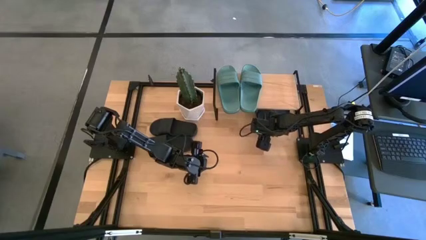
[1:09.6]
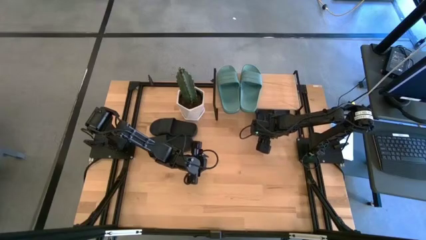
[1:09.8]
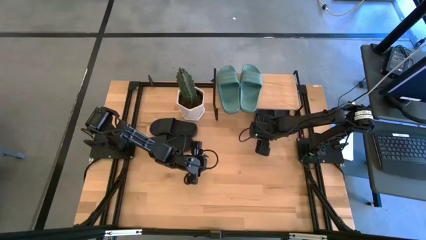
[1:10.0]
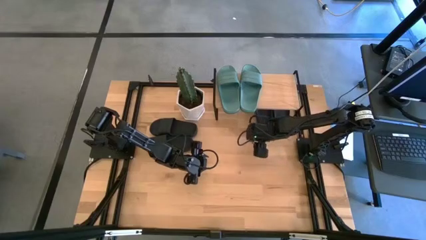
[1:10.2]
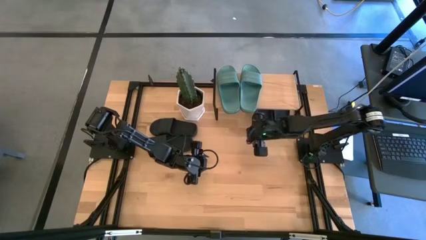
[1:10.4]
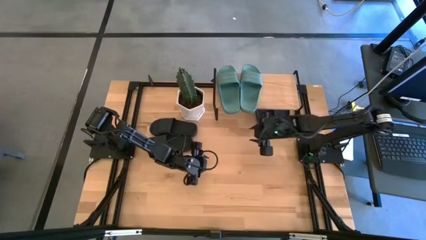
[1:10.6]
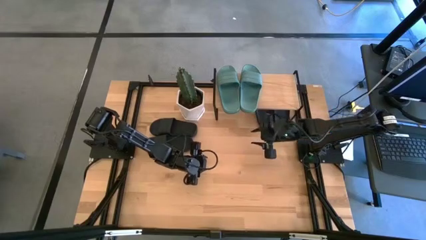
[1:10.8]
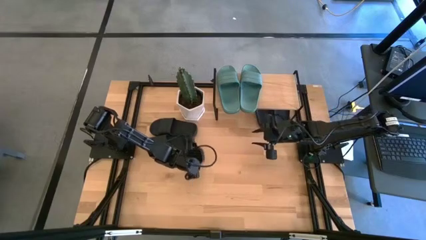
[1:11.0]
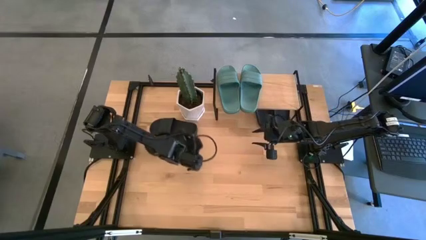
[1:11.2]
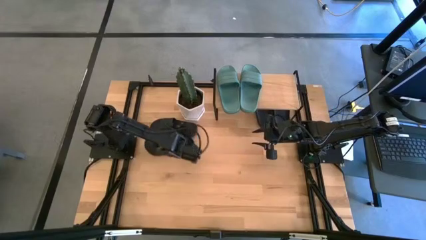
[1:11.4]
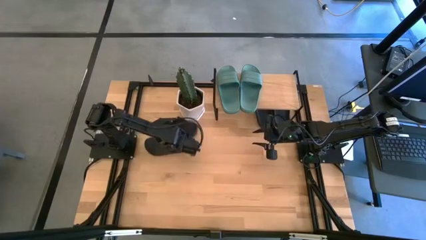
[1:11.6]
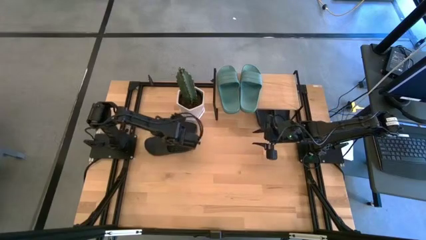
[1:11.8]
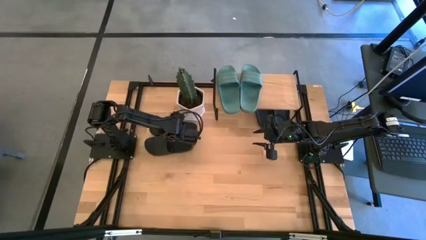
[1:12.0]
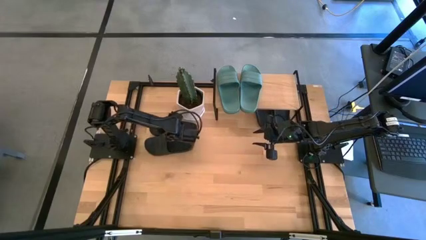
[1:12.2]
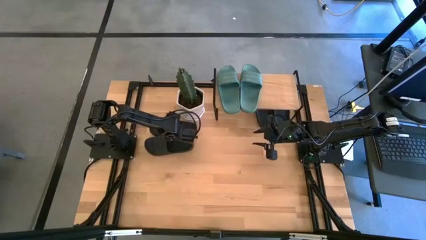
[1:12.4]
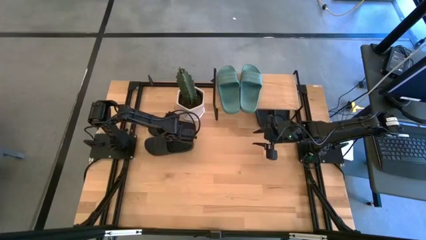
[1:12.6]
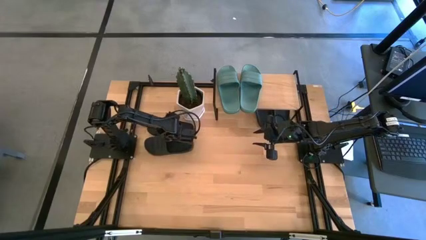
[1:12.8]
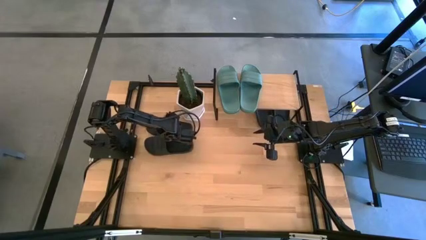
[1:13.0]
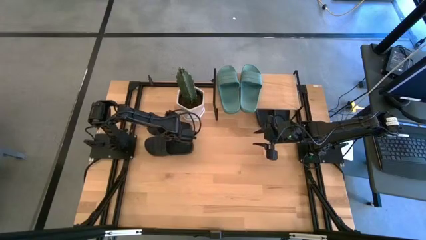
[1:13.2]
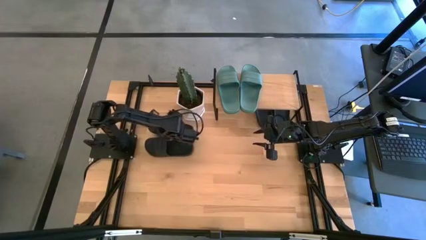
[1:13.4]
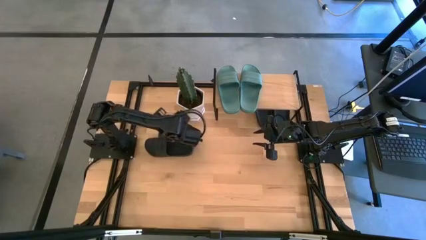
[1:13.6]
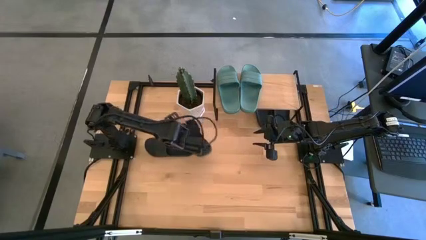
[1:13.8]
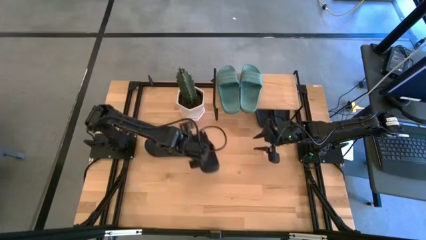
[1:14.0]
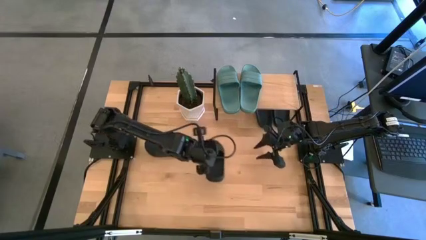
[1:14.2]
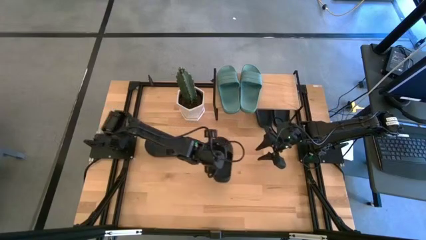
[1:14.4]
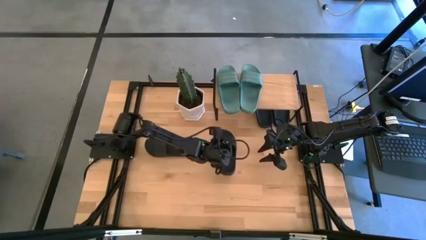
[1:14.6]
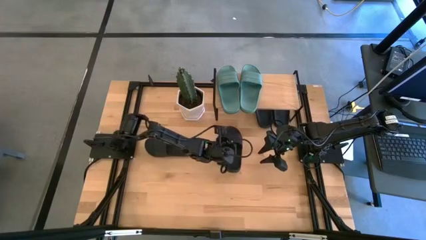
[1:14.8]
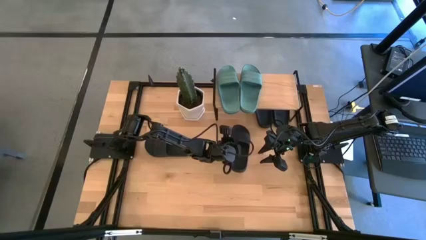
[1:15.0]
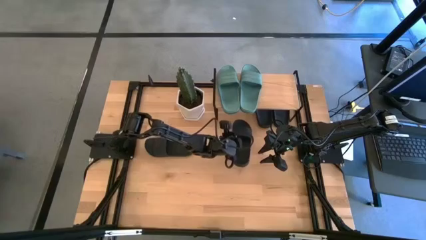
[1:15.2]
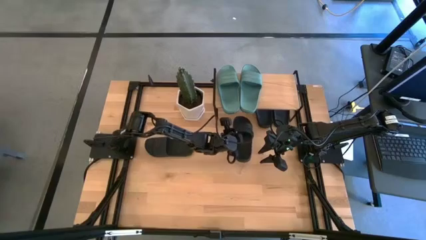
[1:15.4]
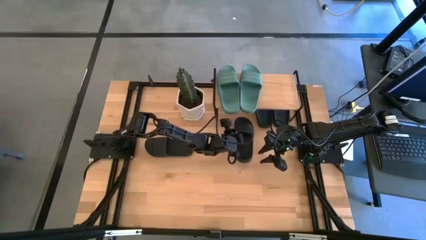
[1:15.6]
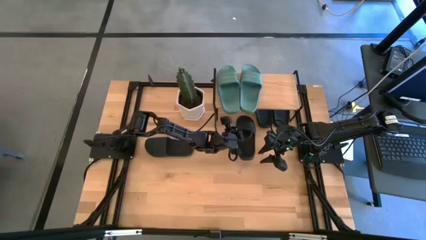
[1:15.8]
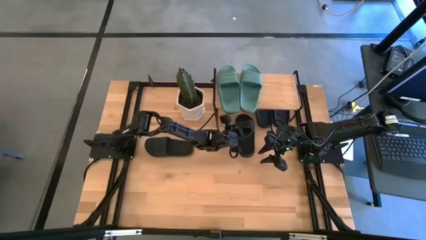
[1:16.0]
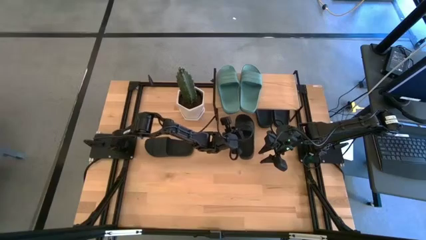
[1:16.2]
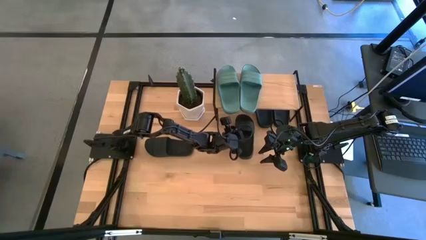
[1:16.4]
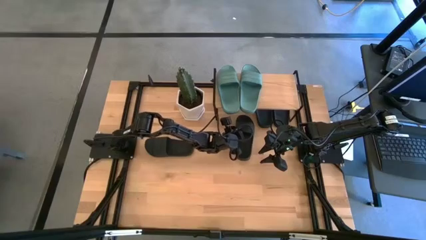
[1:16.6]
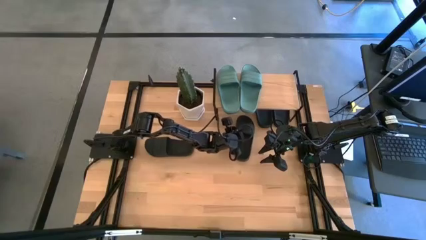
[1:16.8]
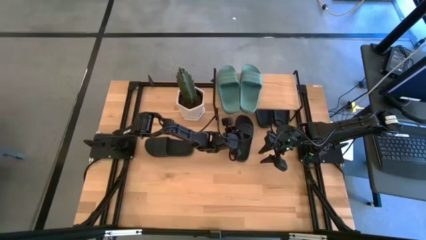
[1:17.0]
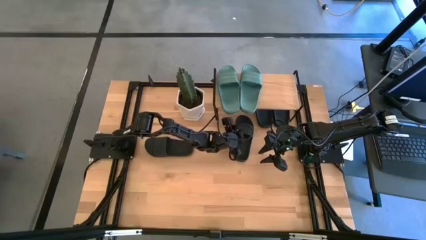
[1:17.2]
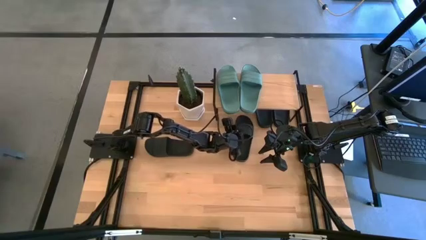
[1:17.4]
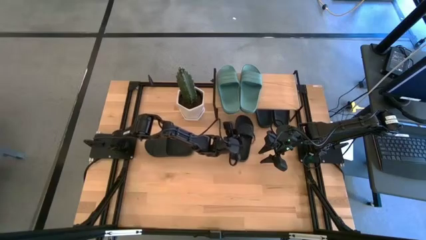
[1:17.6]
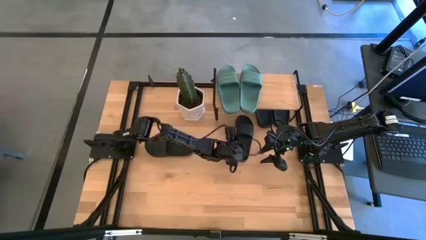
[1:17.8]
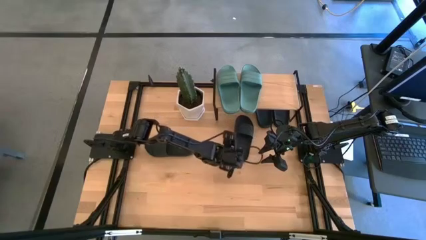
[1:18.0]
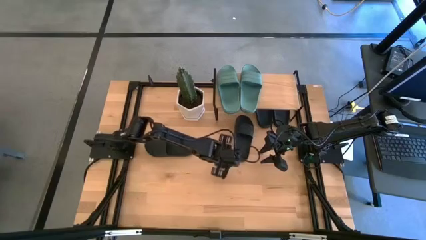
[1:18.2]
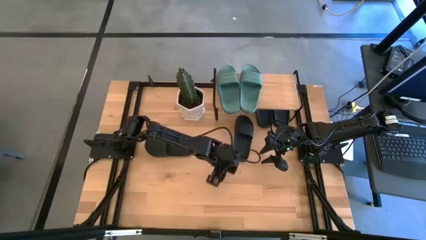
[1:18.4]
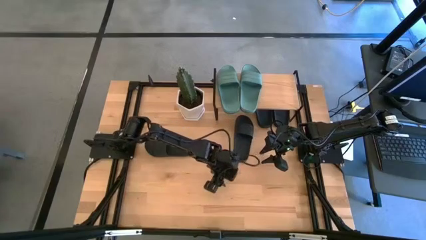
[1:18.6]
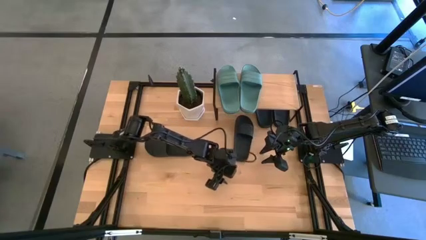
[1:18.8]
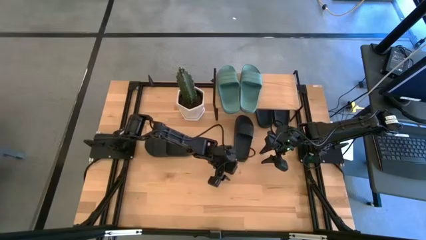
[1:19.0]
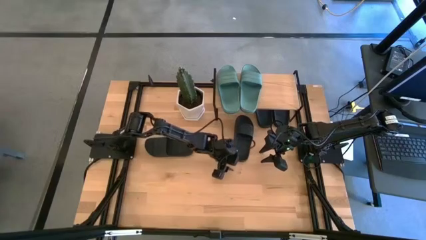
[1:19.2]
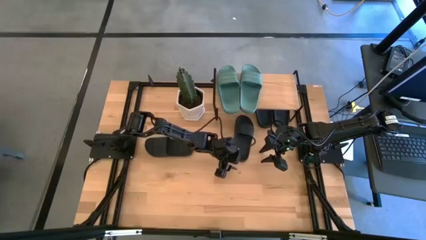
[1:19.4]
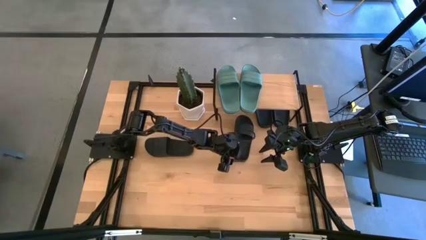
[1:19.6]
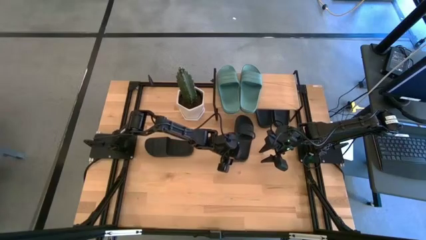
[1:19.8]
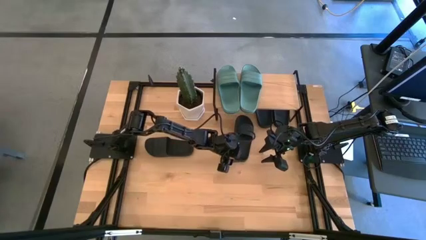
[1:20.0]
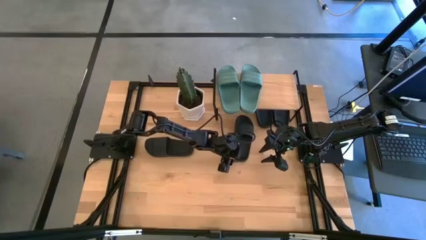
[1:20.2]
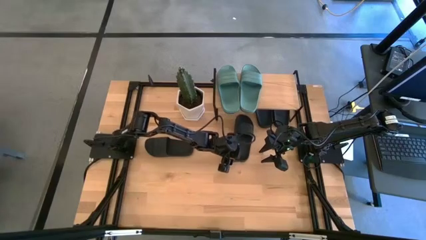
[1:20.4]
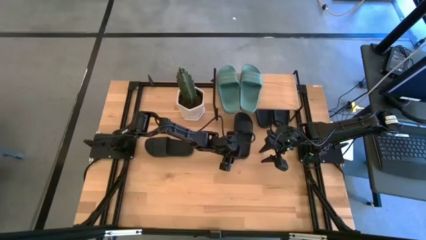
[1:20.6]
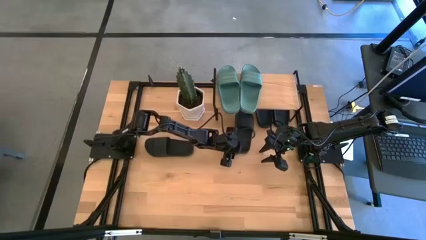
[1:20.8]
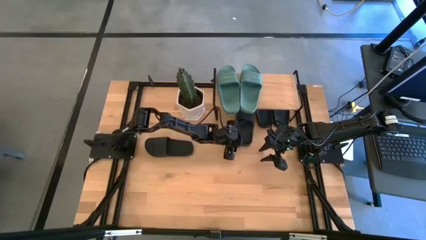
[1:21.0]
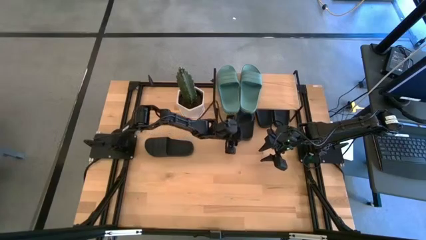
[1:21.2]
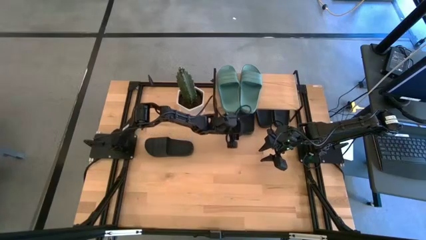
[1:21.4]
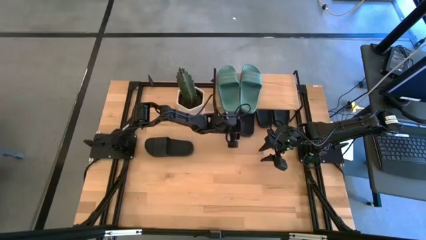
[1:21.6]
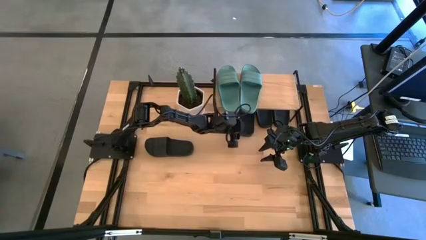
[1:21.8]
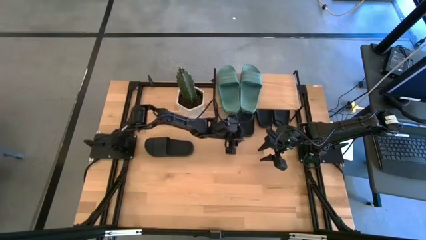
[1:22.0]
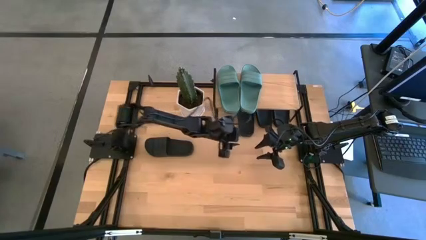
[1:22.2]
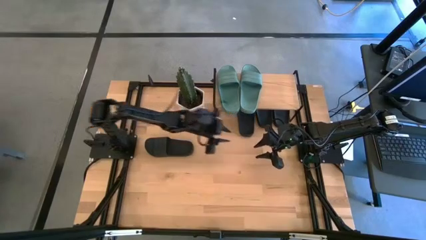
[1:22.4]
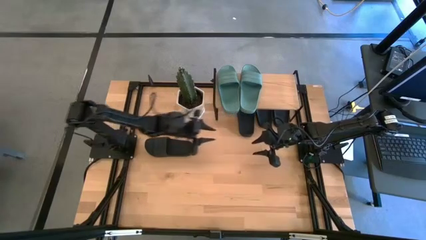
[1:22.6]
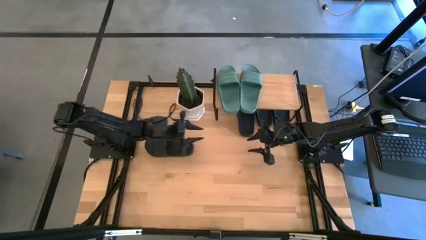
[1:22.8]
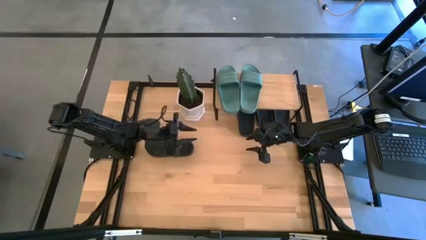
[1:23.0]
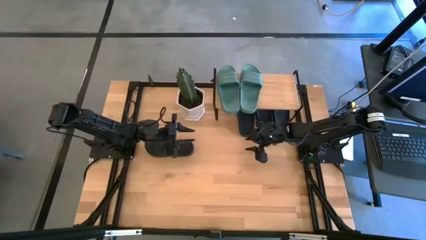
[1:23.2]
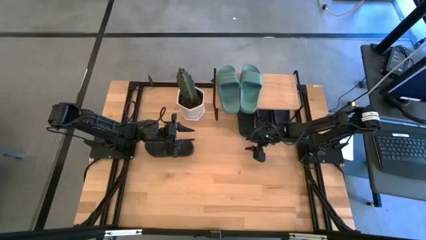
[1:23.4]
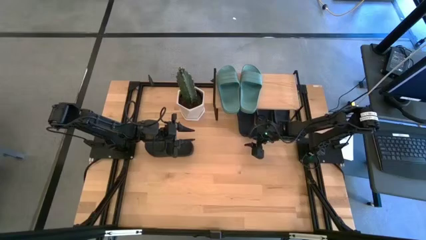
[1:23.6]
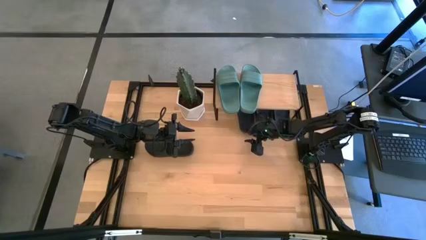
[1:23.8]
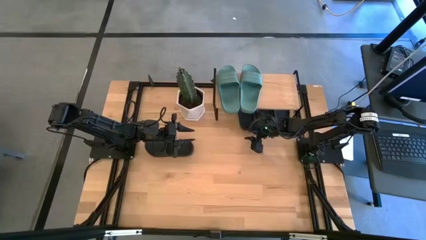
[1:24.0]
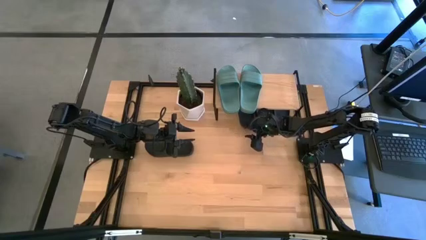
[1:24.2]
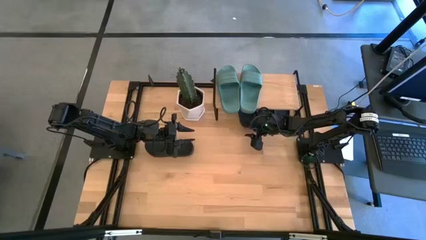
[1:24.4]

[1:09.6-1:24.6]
Task: Pick and place slides into the shelf
Put the black slipper under the shelf
